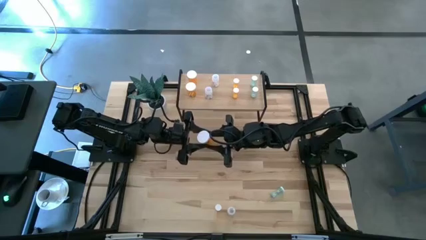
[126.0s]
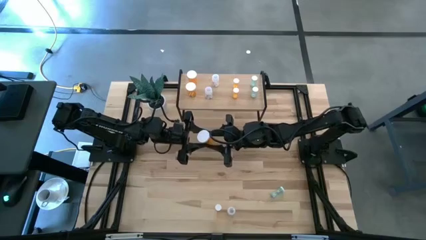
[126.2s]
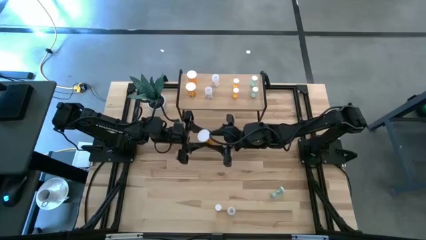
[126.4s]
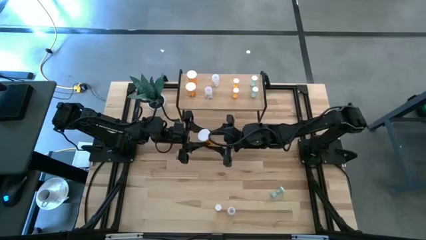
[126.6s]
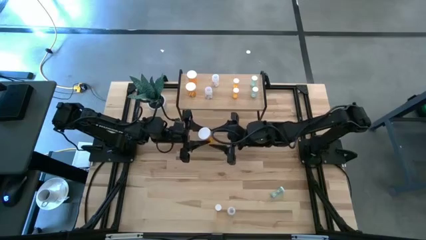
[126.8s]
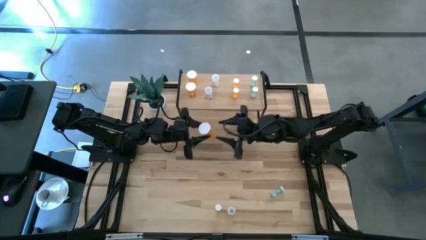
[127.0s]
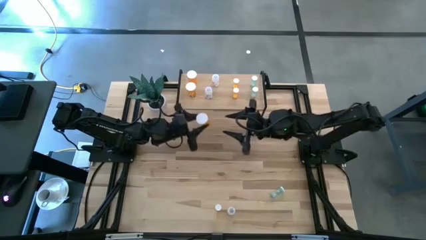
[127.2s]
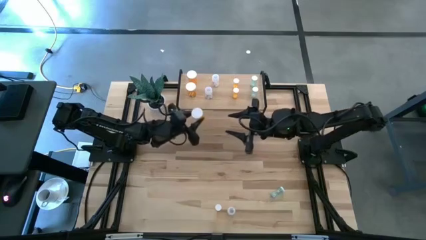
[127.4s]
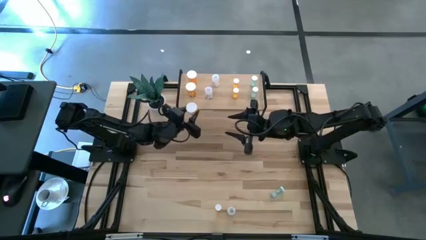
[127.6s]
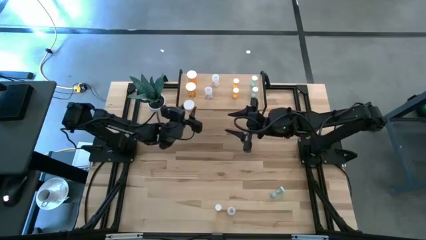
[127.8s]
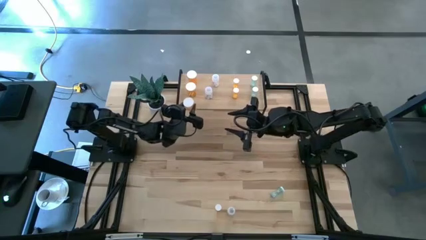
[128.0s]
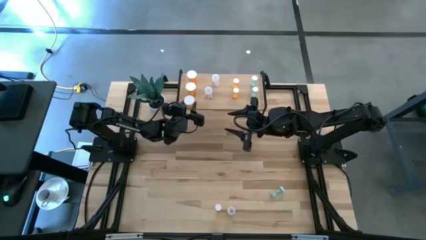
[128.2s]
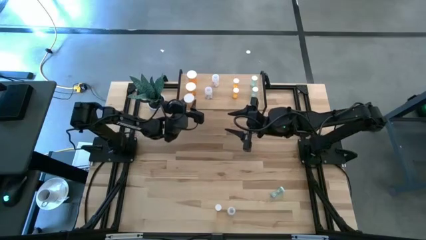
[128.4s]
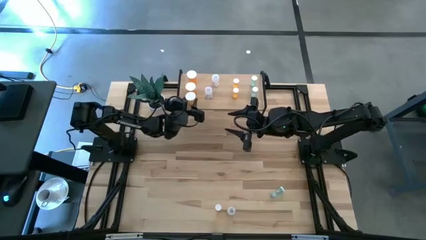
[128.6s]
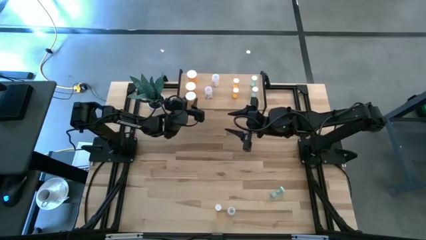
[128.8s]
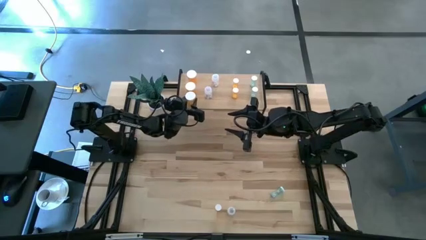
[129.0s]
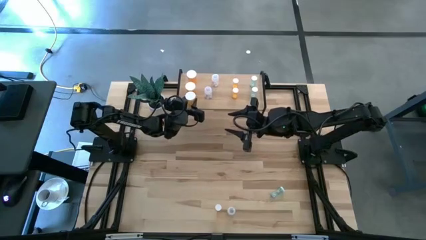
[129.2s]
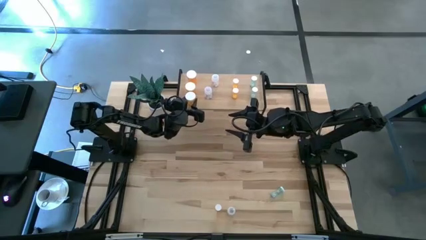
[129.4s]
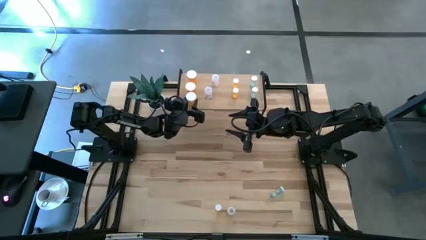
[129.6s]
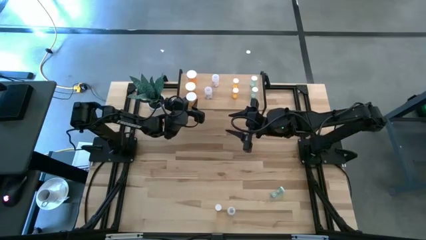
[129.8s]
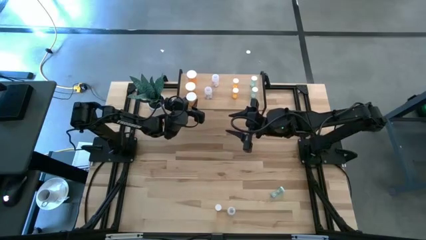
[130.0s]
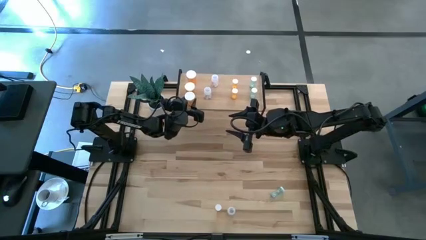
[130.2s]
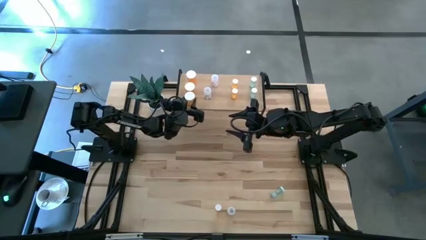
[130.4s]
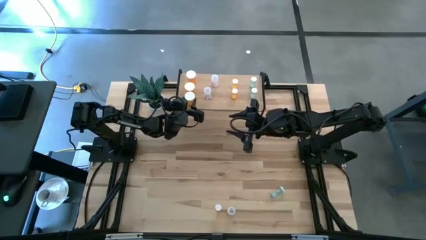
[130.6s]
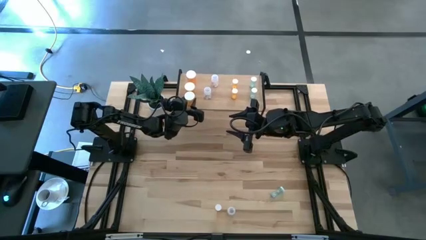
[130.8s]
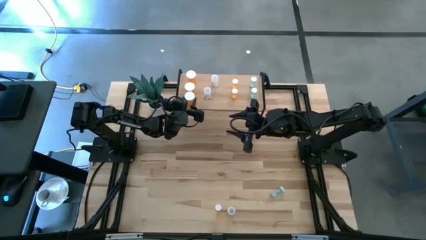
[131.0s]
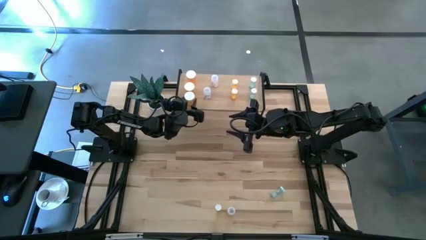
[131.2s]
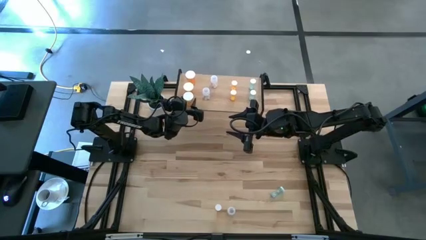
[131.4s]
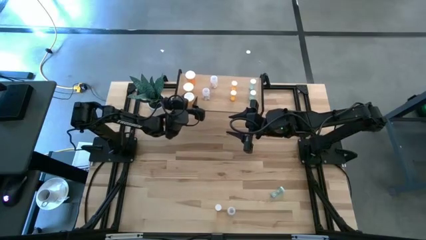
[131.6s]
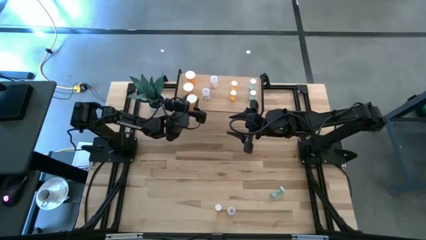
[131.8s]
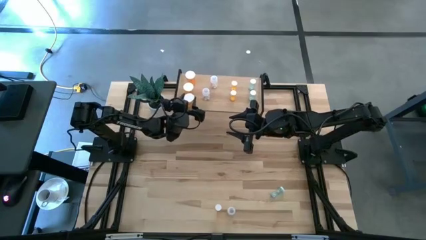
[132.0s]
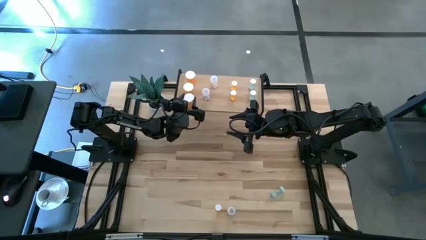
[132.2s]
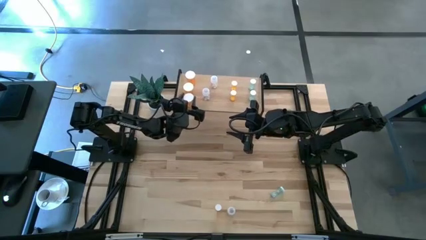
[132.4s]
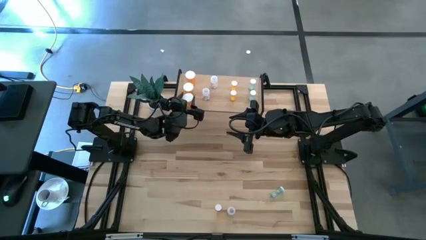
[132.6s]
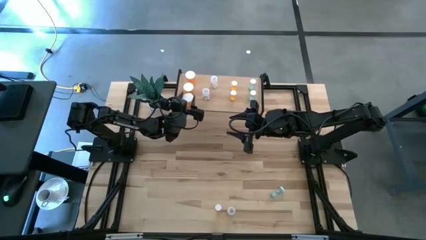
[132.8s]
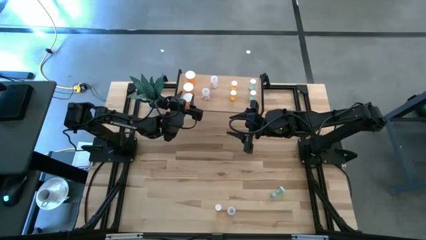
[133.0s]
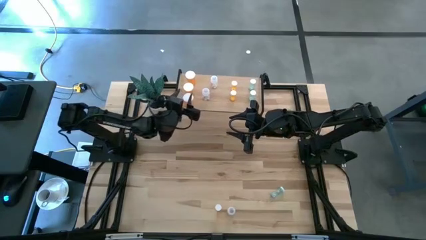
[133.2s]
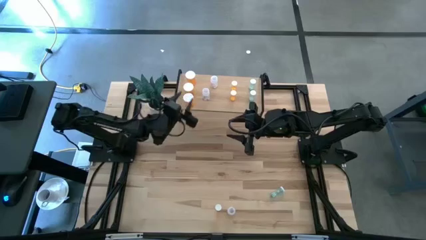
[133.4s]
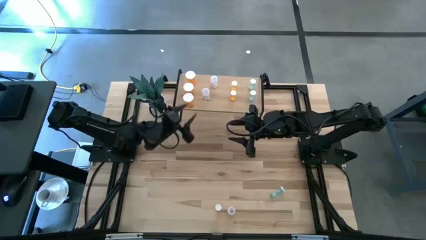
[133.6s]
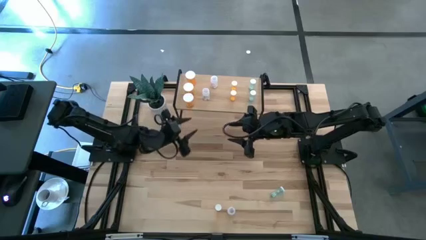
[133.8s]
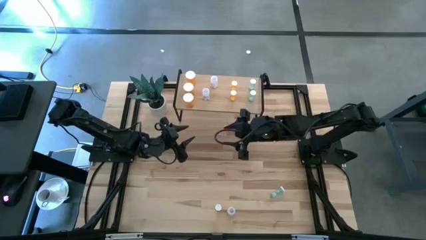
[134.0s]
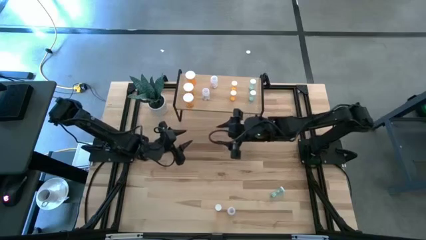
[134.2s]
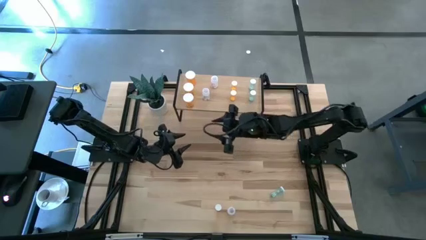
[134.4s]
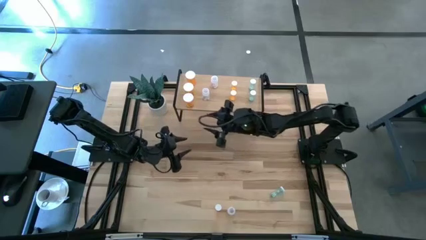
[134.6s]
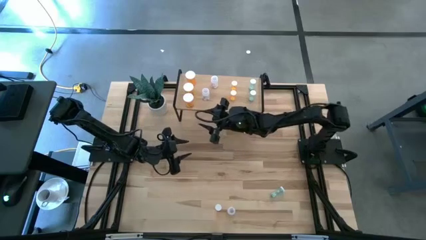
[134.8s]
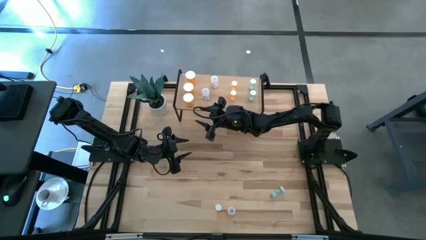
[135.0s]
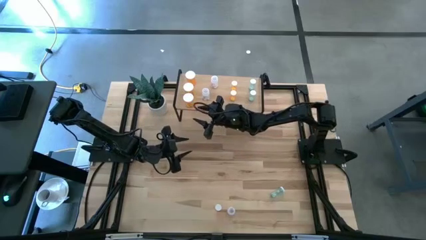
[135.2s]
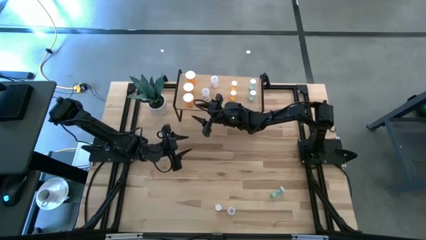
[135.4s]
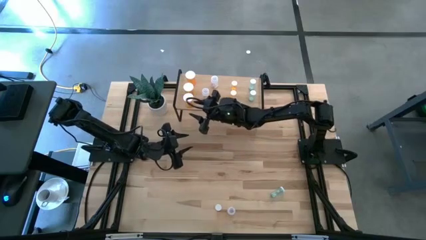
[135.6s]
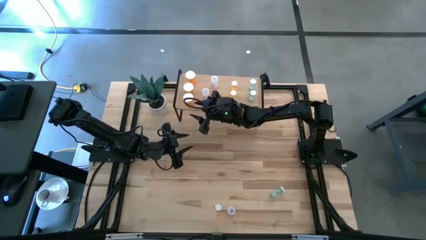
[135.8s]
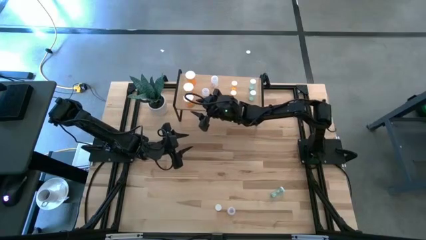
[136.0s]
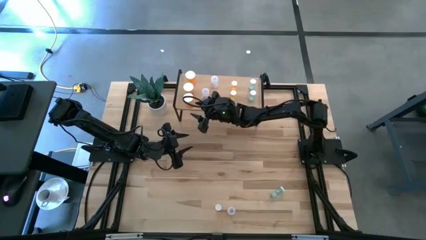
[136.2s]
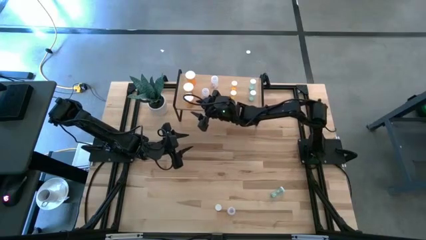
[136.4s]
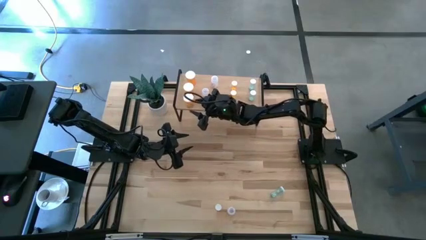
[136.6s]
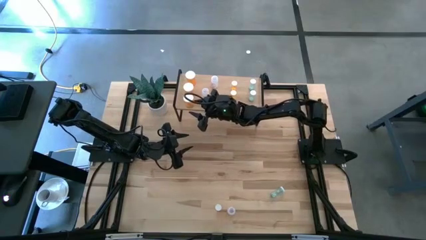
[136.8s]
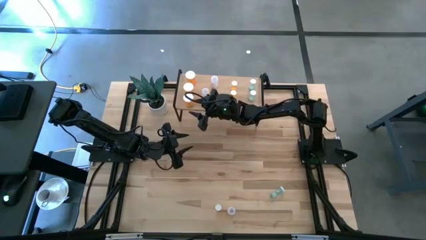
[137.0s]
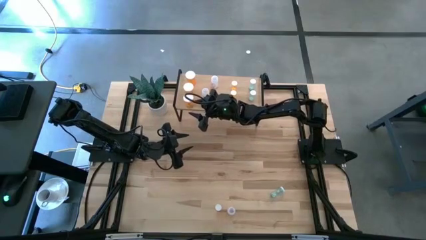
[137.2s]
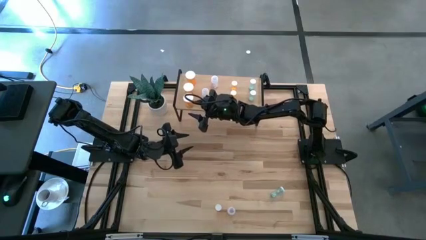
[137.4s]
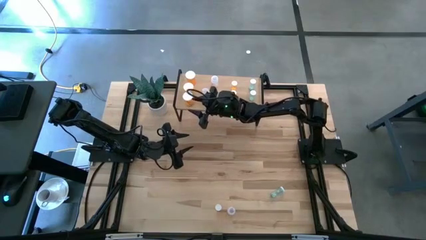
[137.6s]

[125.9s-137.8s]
Task: Pick and place medicine bottles onto shelf by color
Put the large orange pill bottle aligned with the other large orange pill bottles on the shelf
